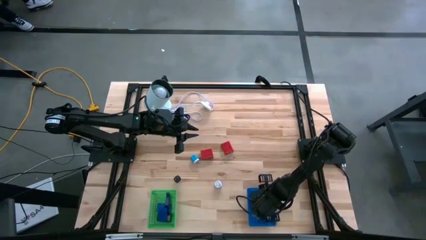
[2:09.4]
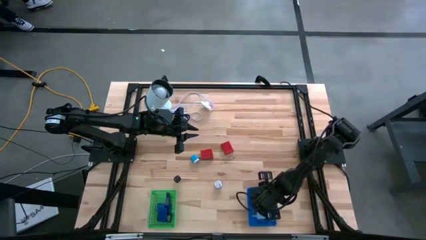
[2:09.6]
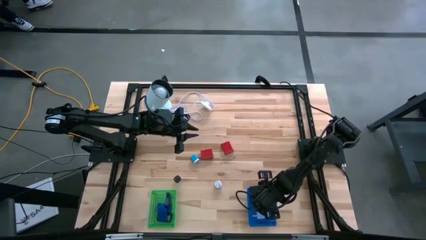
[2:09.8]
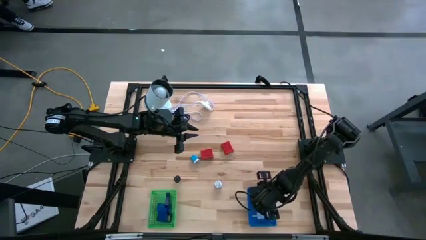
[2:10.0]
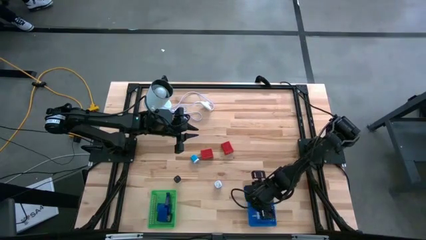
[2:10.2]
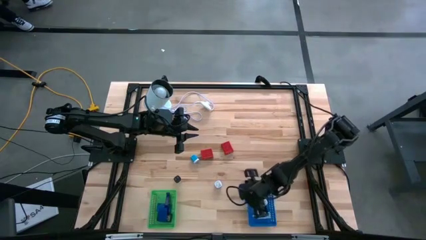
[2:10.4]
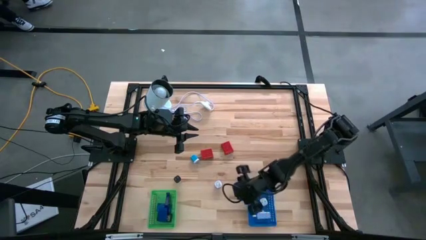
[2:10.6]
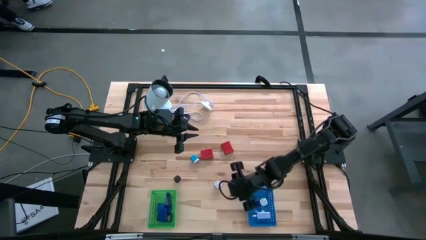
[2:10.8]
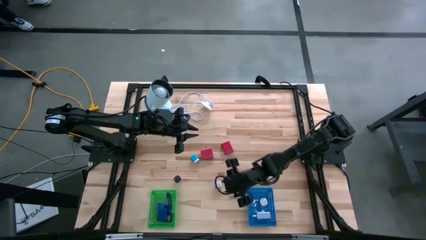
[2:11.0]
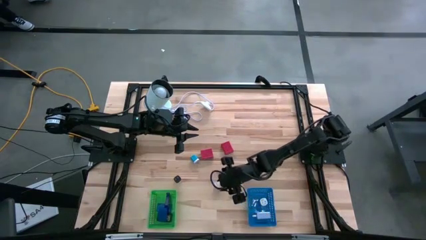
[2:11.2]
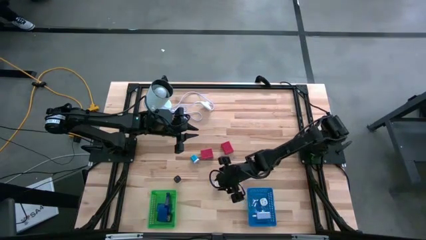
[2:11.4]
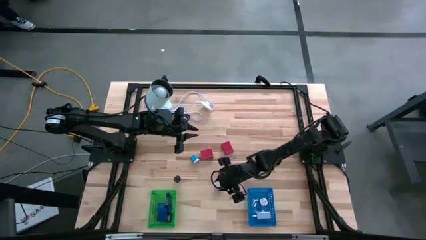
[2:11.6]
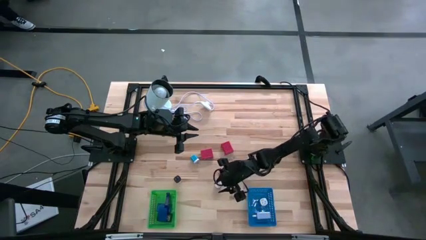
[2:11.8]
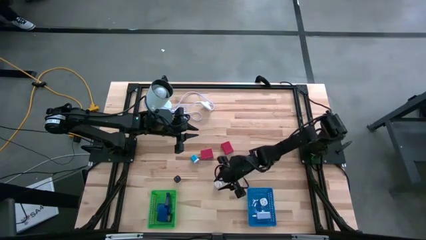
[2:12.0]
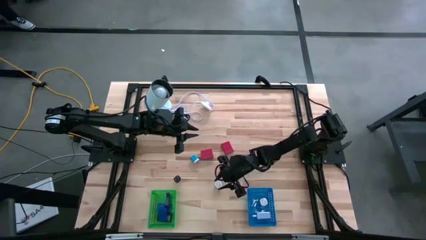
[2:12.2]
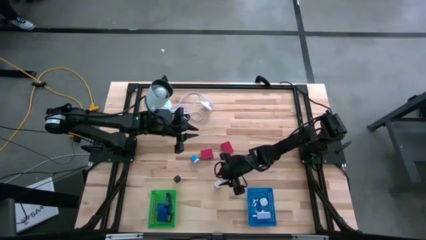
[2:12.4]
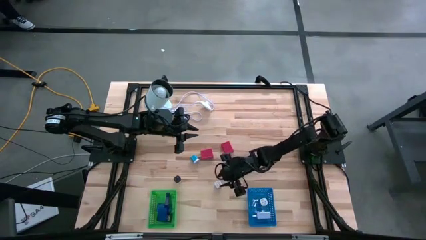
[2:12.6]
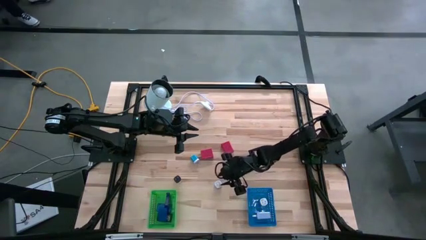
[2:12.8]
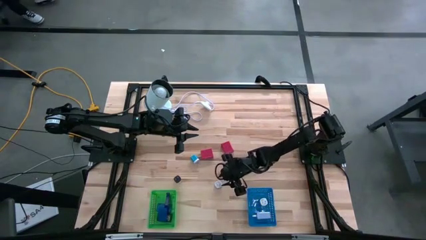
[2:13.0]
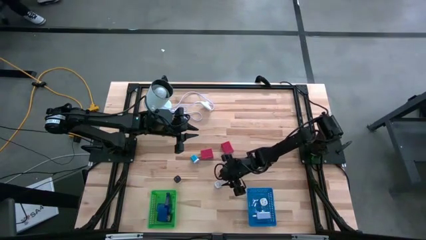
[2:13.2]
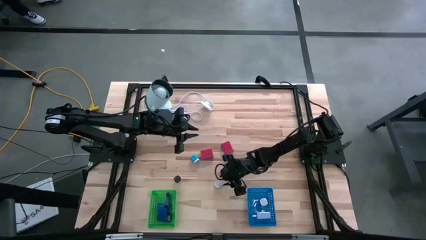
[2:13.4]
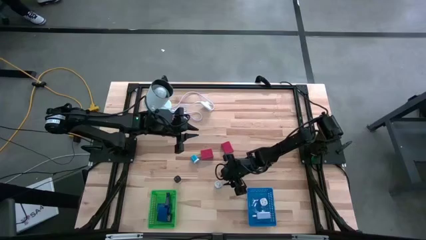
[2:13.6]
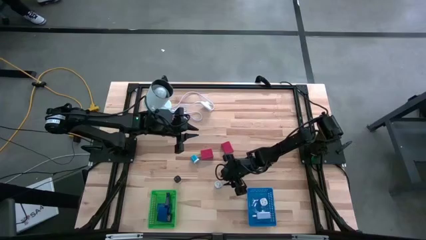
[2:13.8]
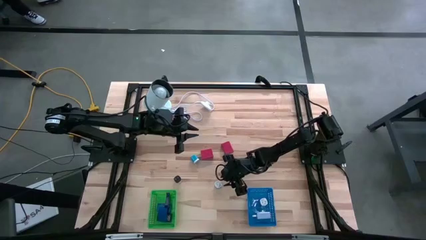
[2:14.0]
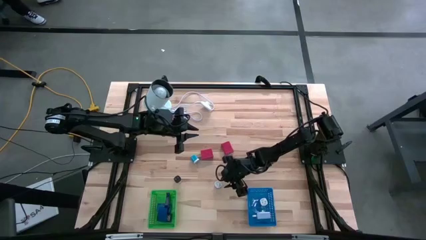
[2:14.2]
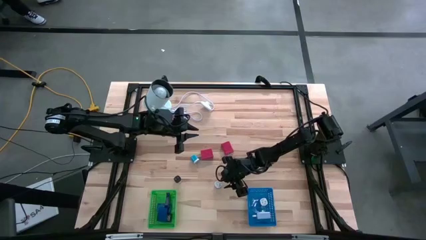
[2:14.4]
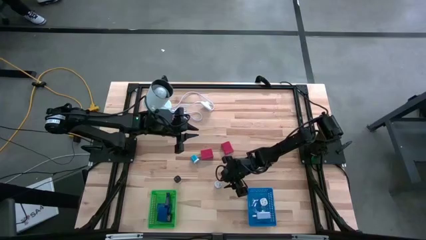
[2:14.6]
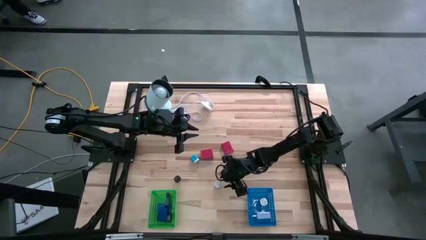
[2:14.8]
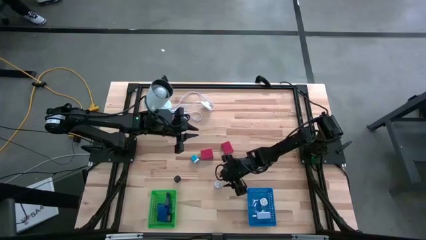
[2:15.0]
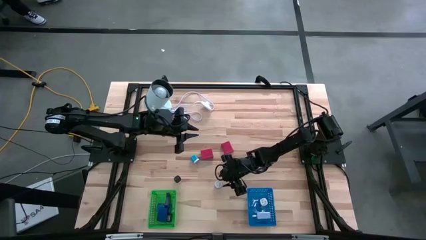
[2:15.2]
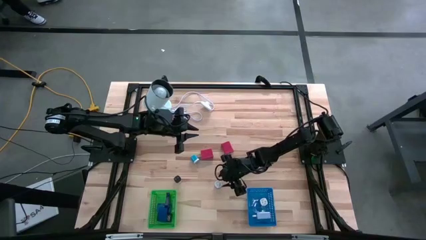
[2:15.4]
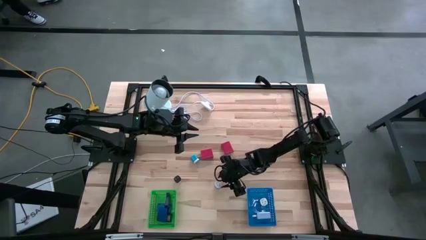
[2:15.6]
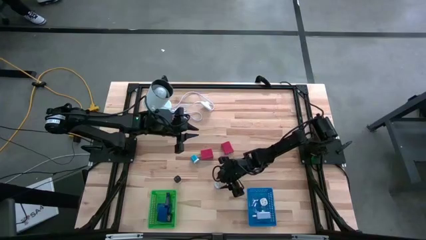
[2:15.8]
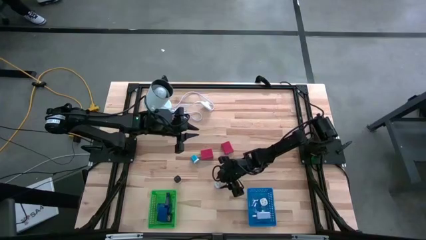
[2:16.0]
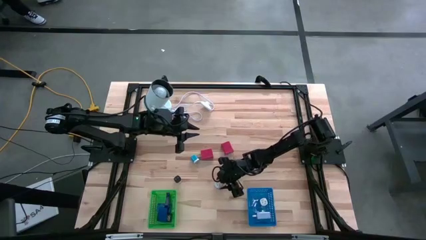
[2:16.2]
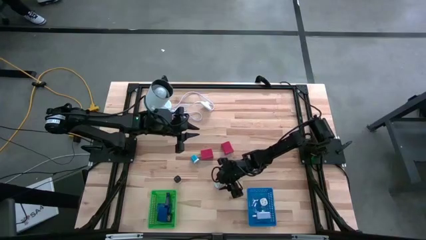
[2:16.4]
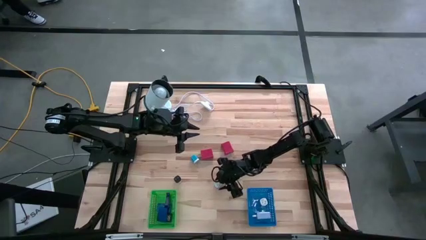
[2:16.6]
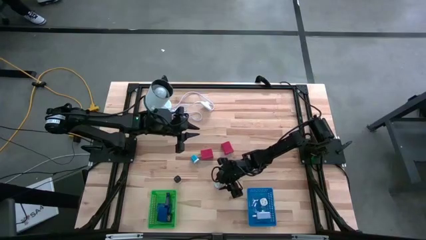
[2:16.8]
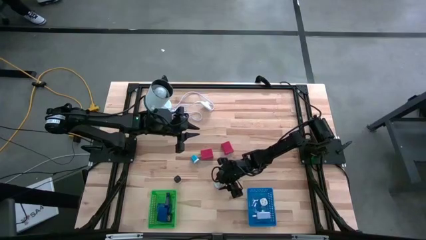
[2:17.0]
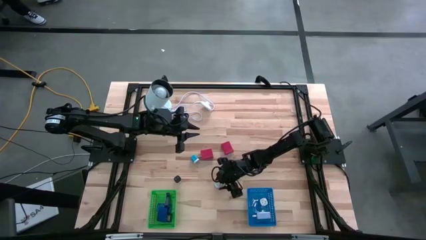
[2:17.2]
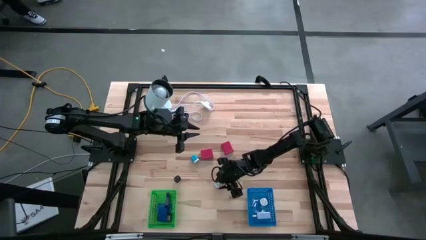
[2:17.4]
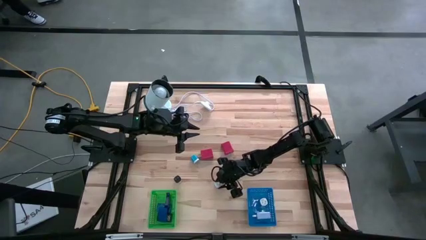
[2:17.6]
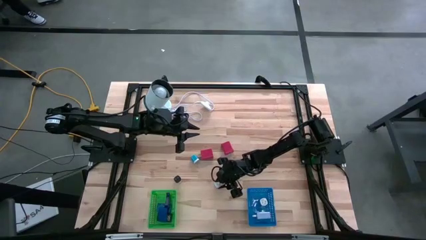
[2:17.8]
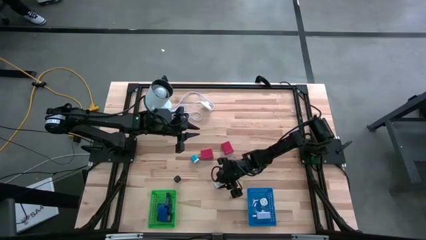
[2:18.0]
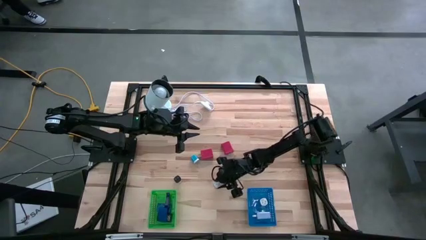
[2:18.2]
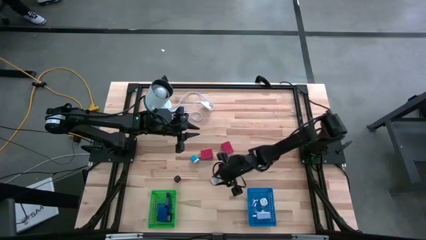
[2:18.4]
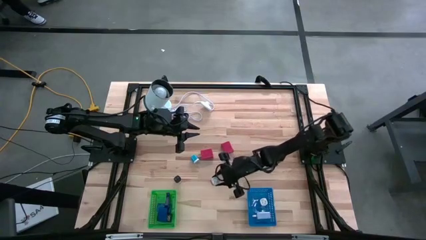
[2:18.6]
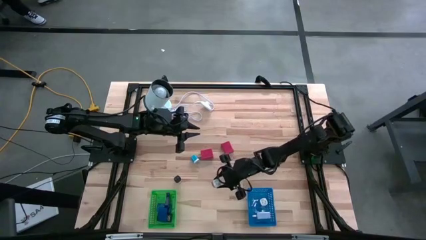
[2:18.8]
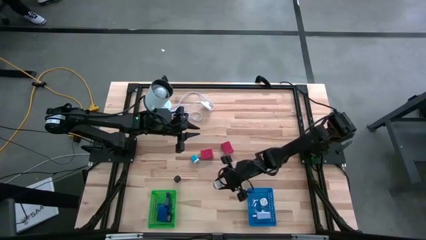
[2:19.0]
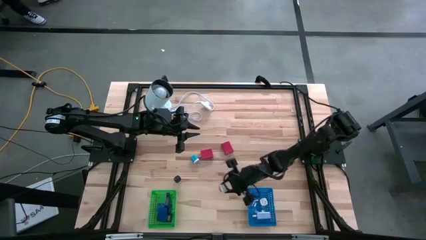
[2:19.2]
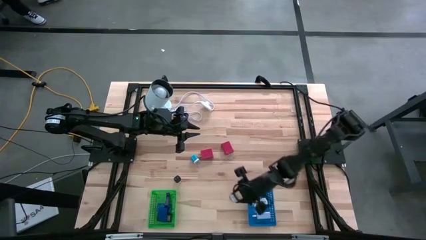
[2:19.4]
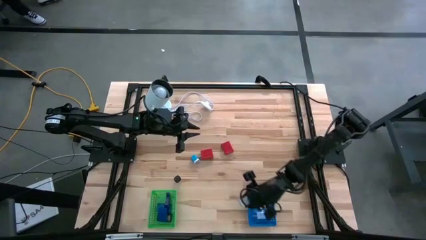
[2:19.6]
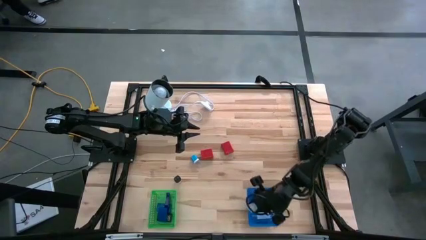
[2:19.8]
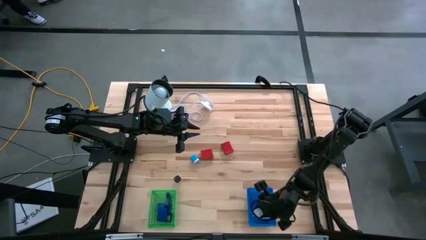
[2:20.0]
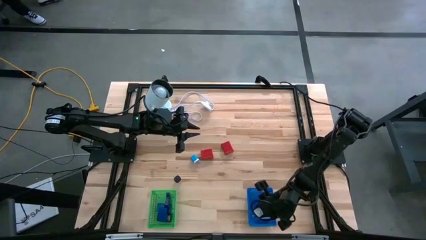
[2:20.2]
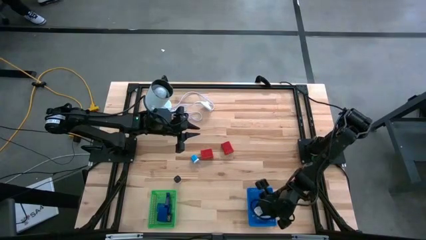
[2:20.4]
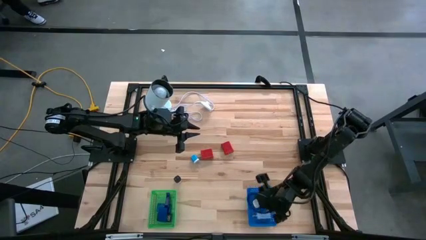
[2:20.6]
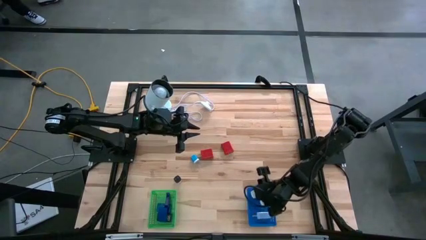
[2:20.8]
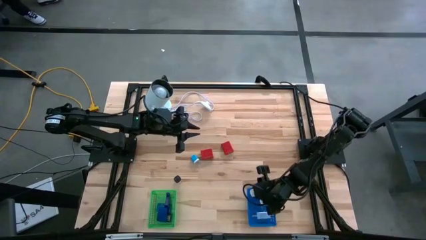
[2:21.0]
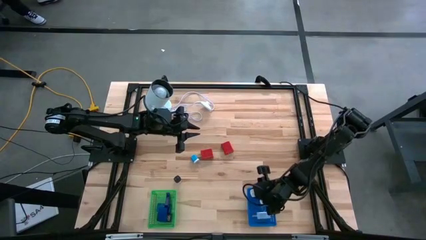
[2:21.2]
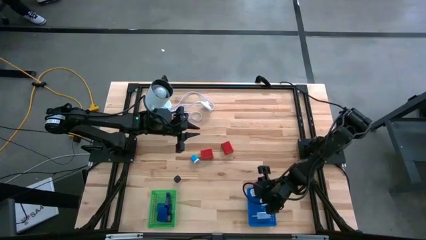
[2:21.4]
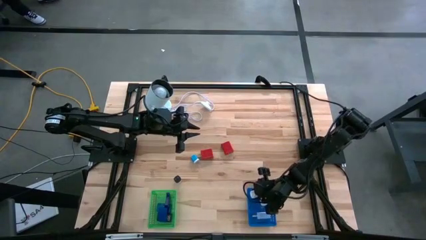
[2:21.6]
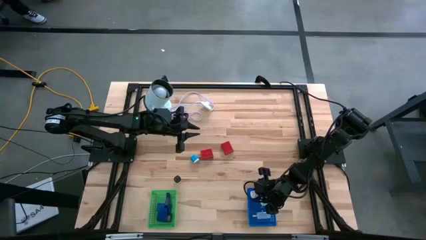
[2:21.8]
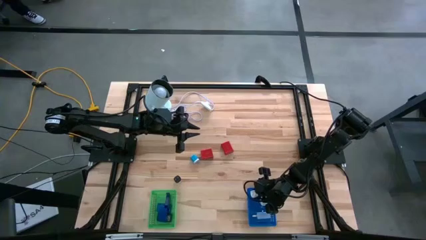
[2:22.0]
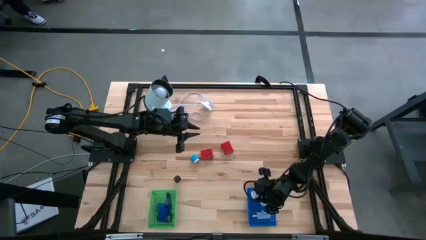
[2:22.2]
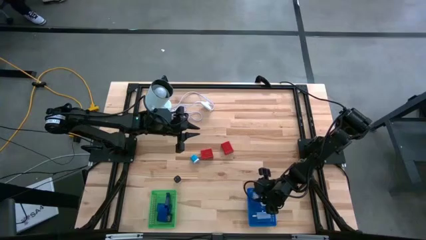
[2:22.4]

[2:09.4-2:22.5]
Task: Pick & Place Office items
Put the purple charger adapter into the blue bin

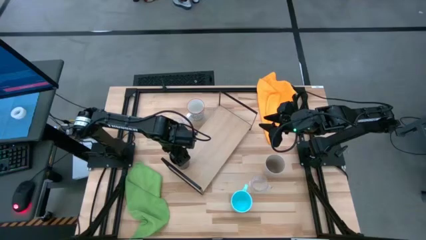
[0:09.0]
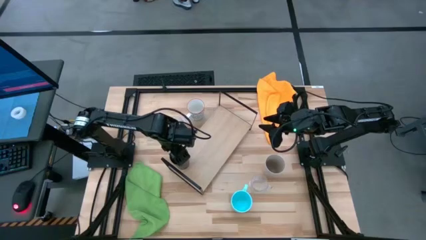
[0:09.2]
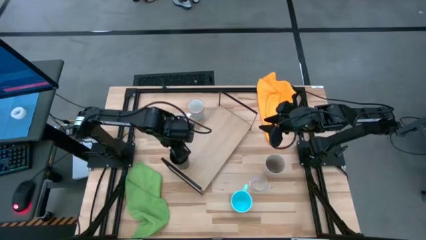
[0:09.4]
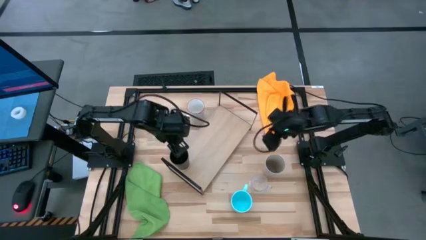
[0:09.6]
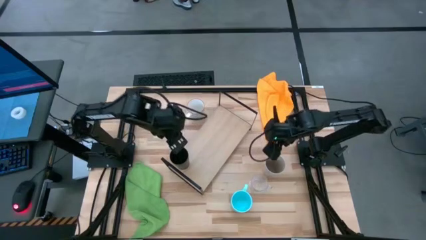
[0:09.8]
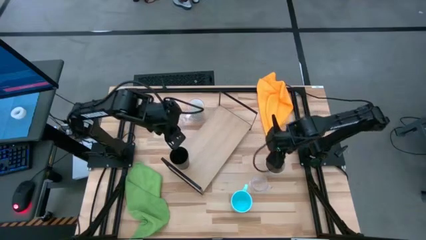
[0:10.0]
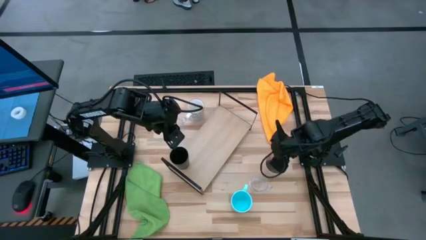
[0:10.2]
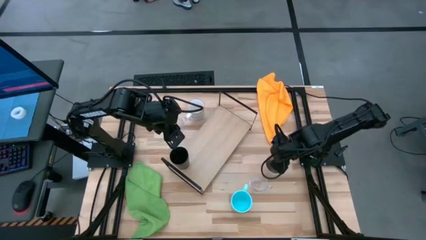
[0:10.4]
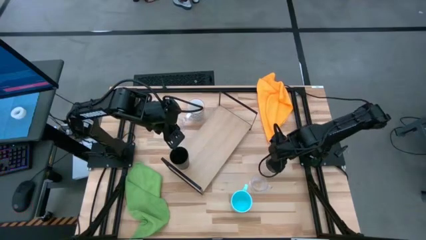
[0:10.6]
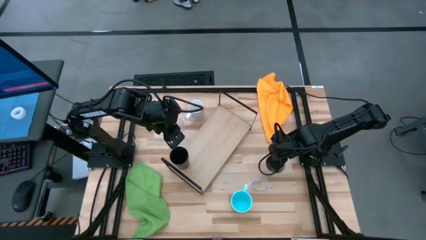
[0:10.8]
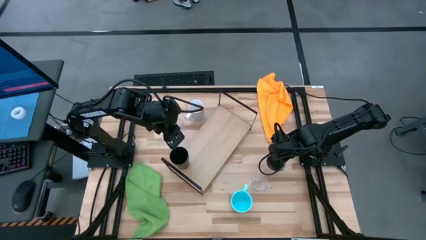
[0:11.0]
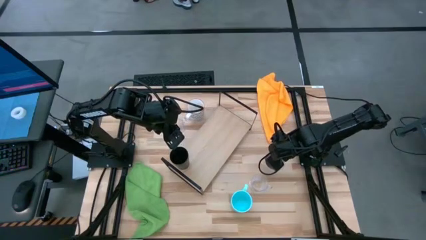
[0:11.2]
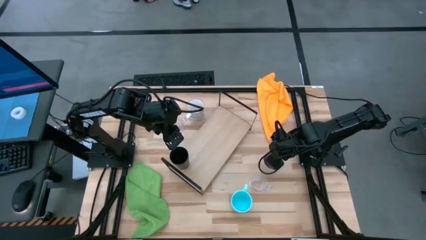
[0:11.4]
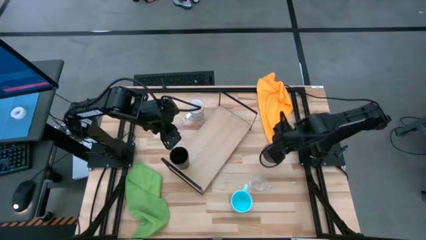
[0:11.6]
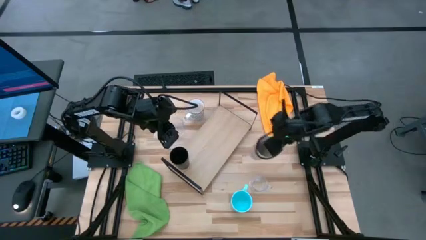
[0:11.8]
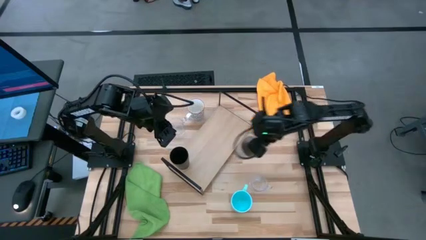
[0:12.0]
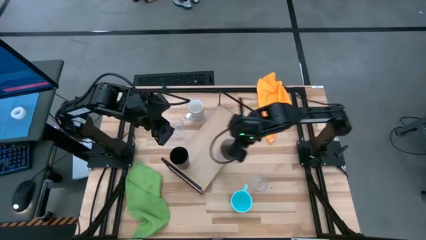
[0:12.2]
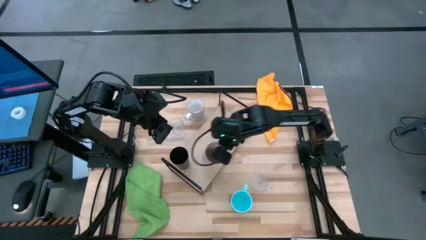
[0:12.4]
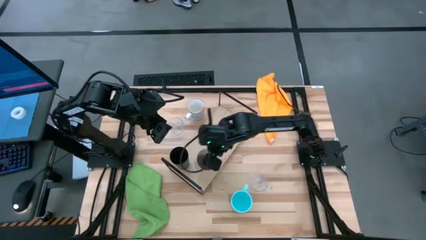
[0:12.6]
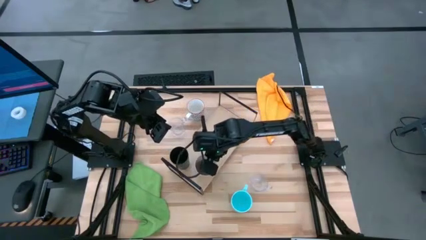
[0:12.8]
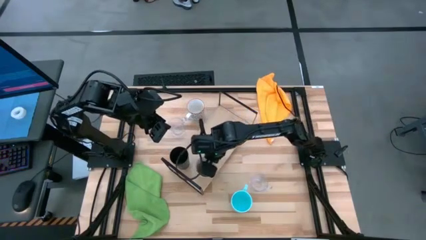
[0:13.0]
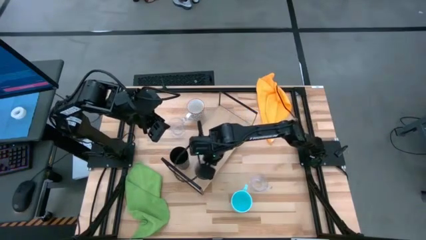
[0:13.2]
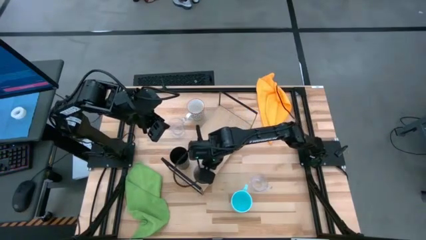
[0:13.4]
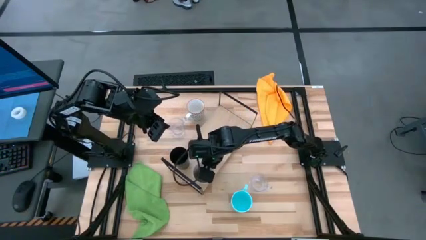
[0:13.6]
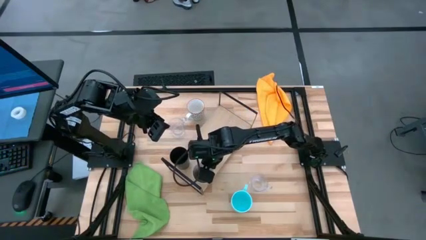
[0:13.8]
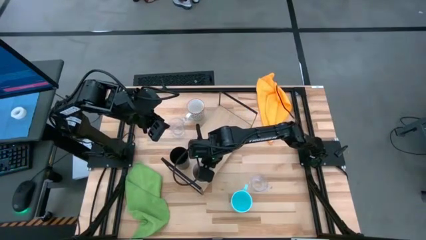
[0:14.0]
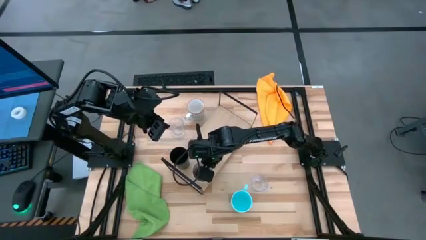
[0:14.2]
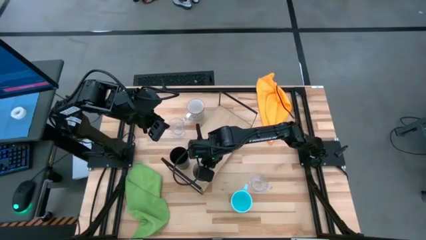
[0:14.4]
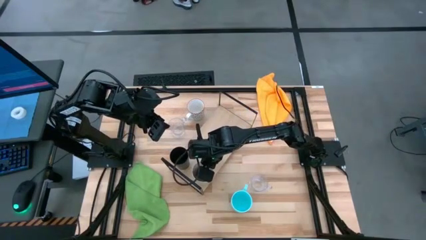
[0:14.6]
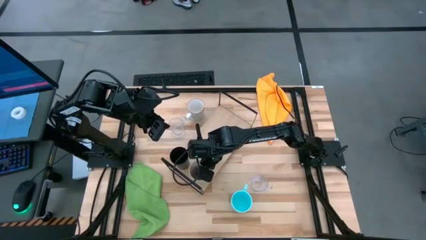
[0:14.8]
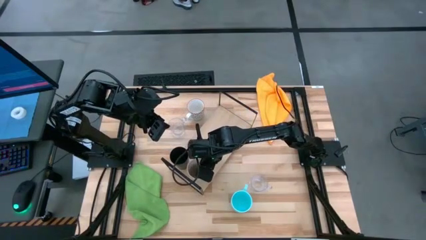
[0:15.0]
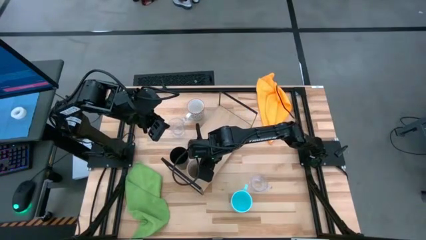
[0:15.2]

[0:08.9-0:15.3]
Task: Stack small to large cups/mugs on shelf
Put the white cup on the shelf
